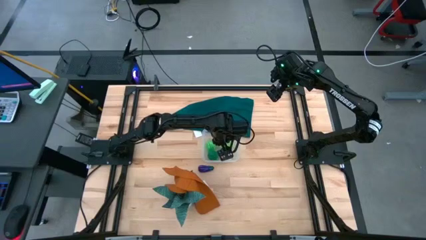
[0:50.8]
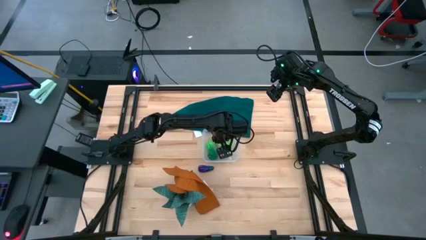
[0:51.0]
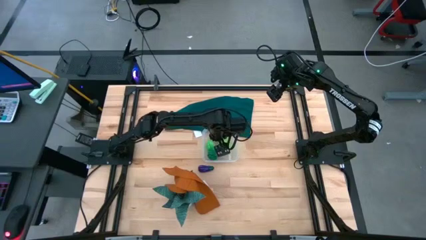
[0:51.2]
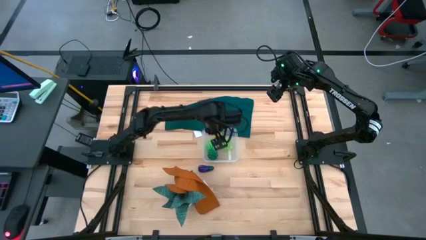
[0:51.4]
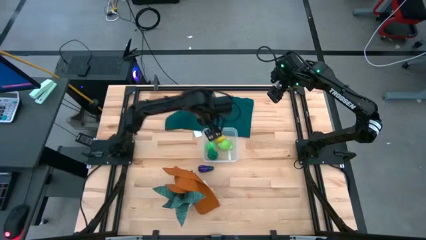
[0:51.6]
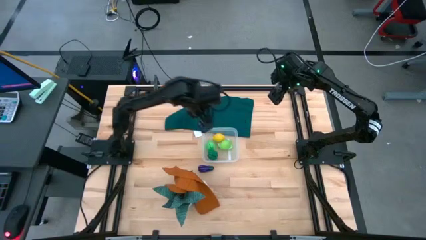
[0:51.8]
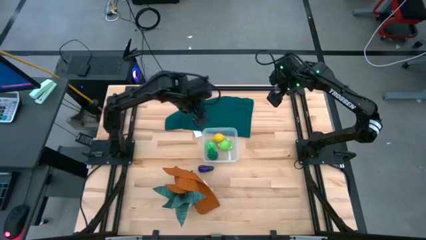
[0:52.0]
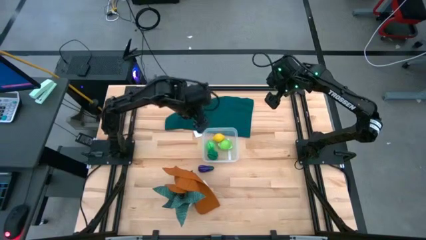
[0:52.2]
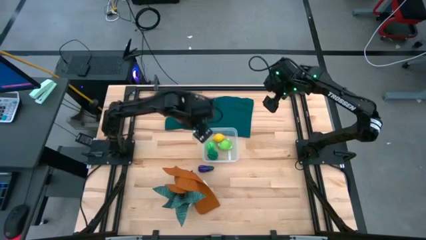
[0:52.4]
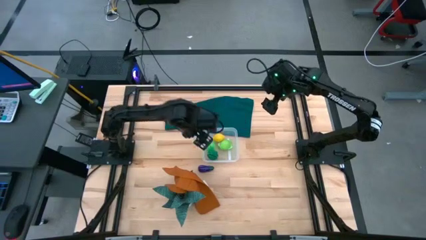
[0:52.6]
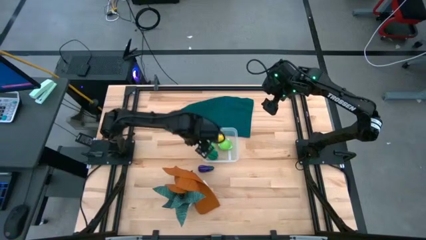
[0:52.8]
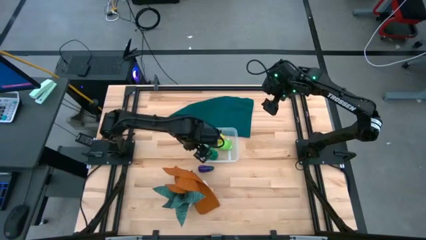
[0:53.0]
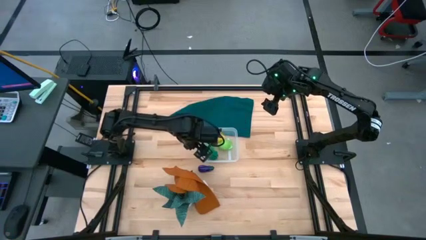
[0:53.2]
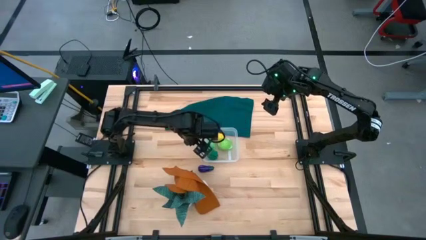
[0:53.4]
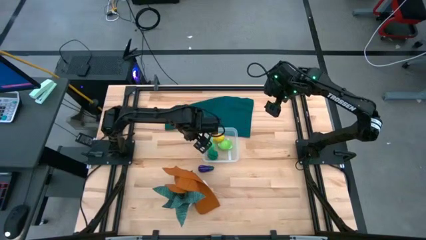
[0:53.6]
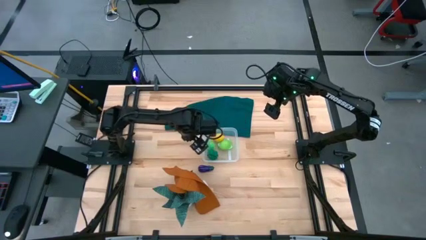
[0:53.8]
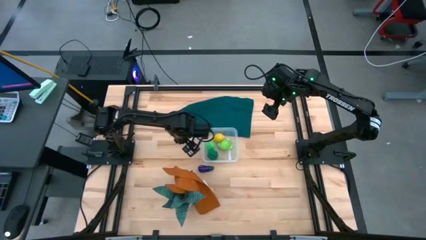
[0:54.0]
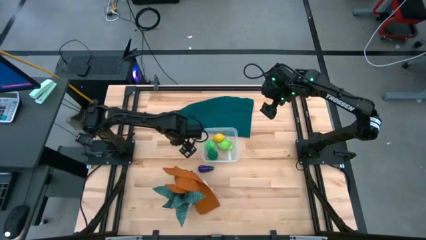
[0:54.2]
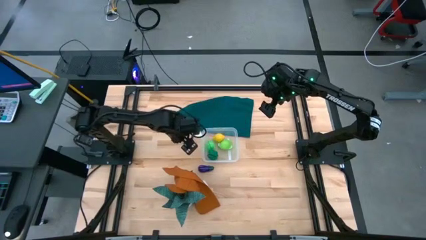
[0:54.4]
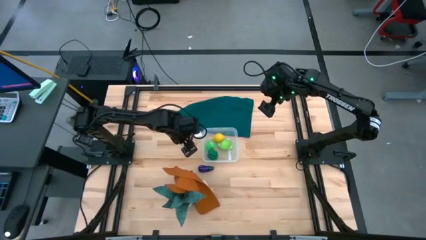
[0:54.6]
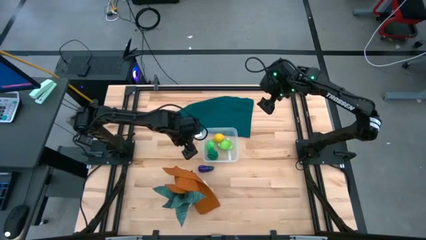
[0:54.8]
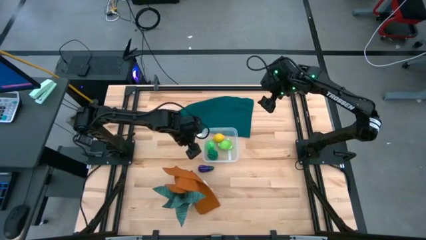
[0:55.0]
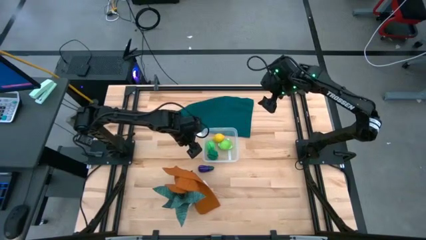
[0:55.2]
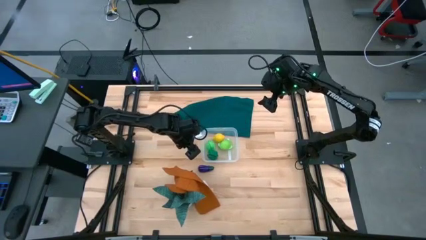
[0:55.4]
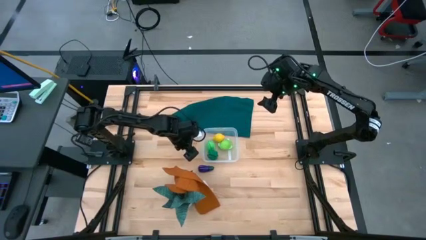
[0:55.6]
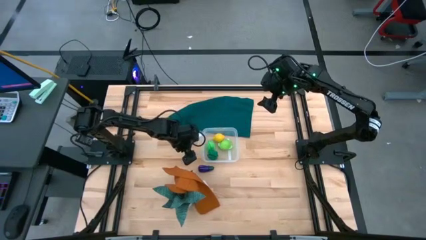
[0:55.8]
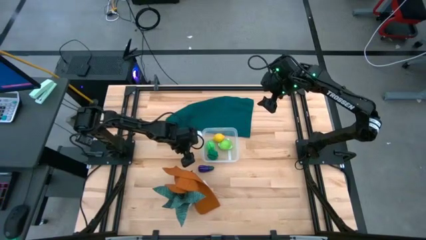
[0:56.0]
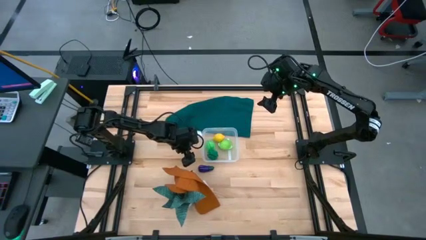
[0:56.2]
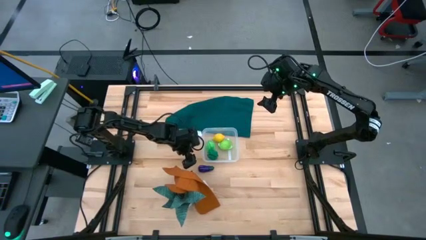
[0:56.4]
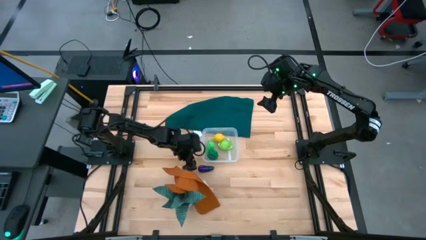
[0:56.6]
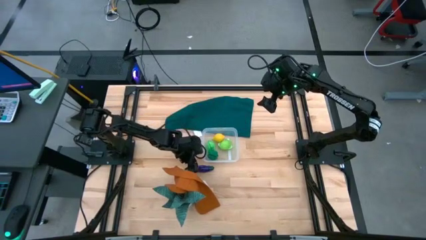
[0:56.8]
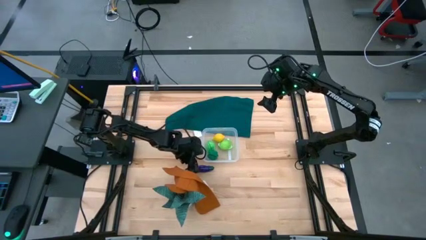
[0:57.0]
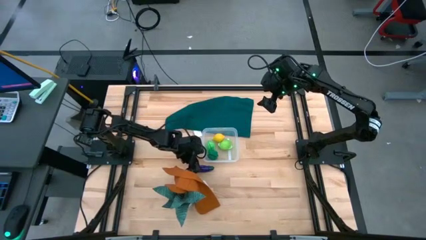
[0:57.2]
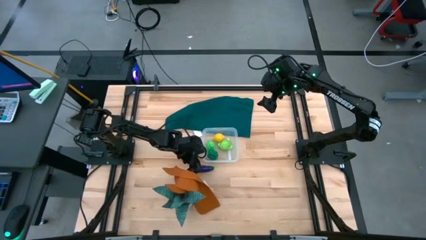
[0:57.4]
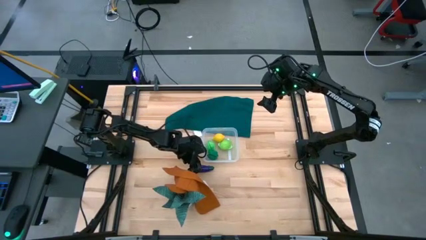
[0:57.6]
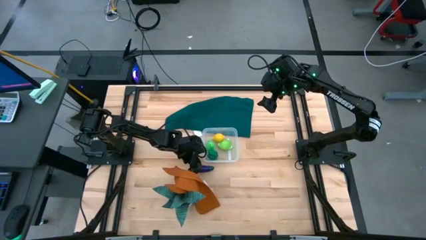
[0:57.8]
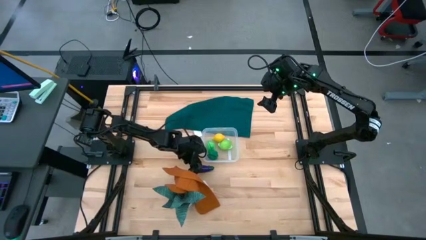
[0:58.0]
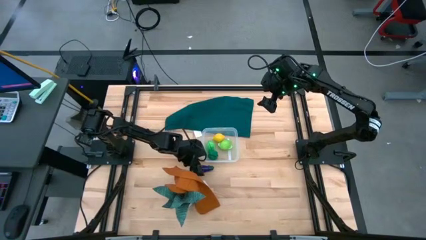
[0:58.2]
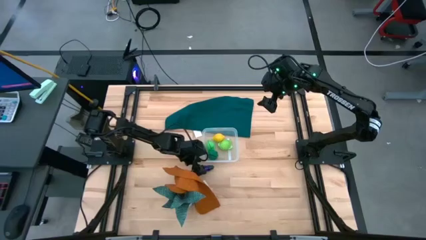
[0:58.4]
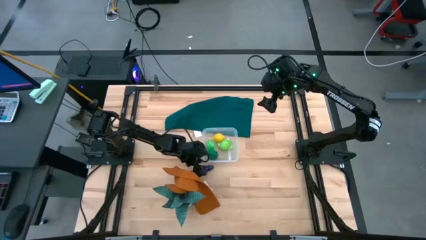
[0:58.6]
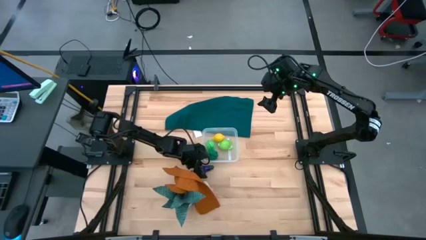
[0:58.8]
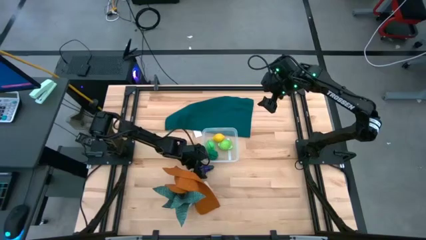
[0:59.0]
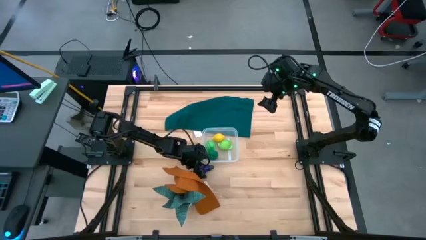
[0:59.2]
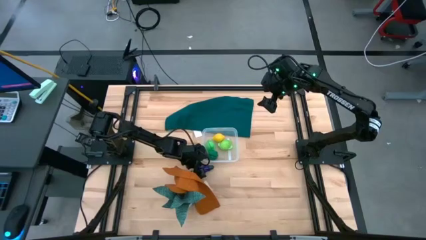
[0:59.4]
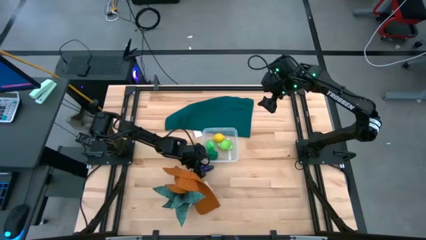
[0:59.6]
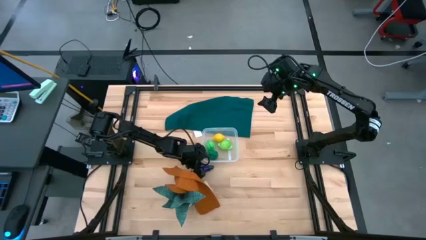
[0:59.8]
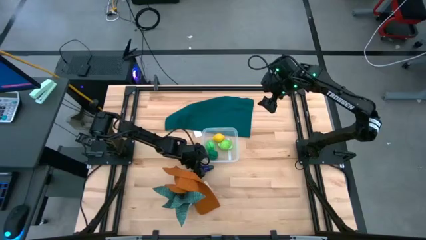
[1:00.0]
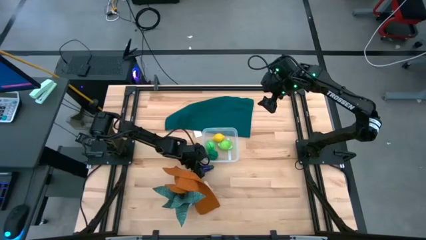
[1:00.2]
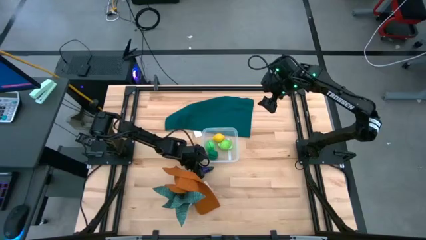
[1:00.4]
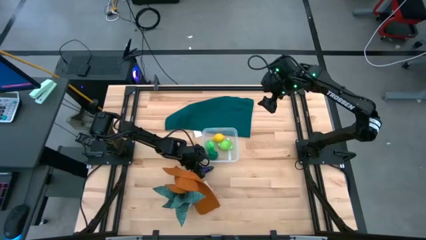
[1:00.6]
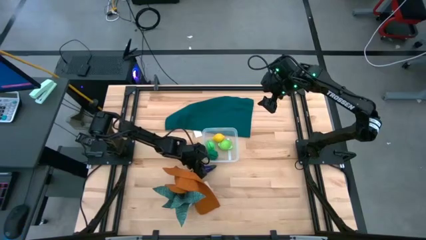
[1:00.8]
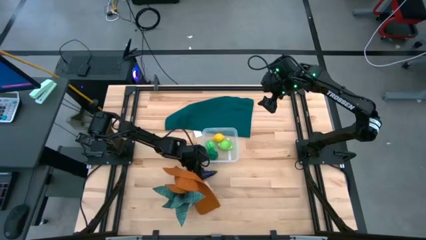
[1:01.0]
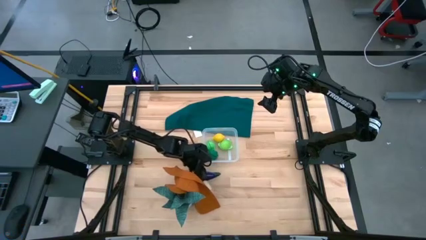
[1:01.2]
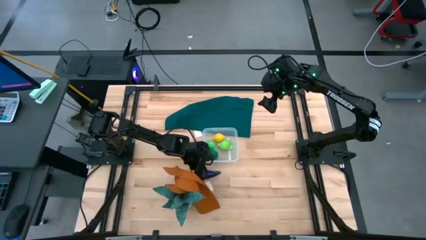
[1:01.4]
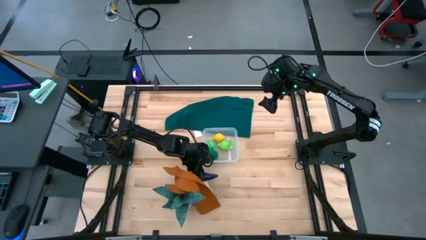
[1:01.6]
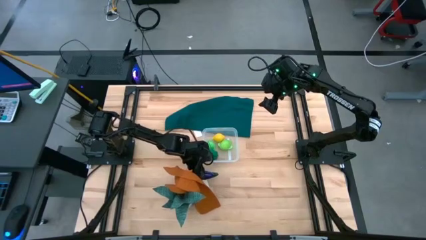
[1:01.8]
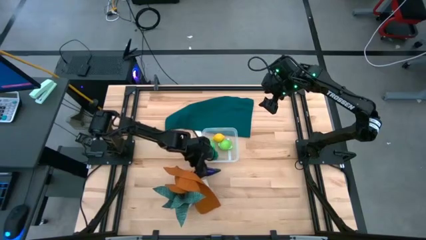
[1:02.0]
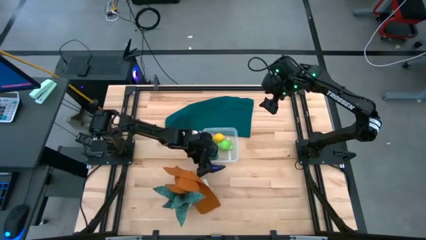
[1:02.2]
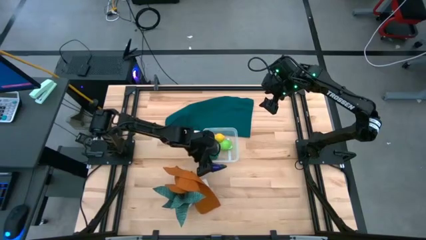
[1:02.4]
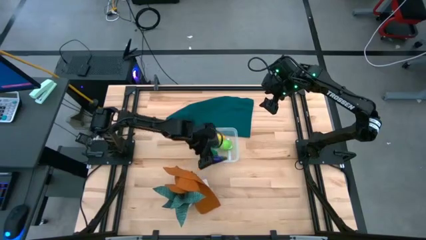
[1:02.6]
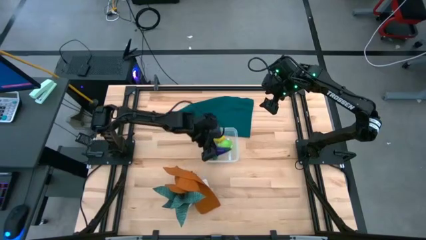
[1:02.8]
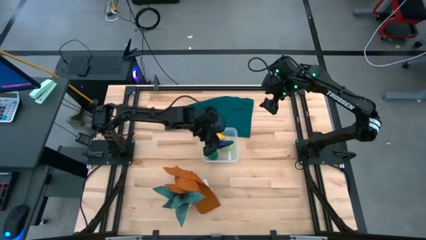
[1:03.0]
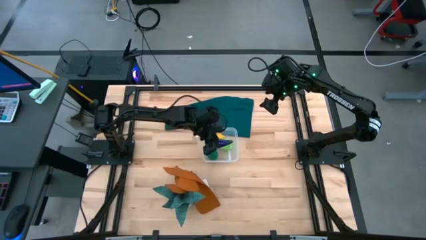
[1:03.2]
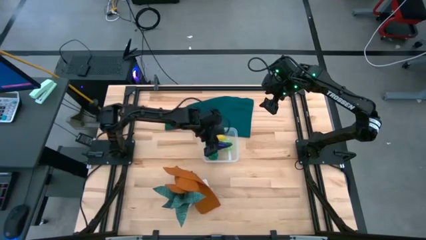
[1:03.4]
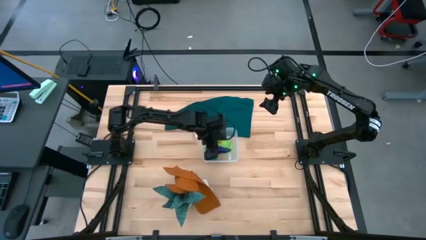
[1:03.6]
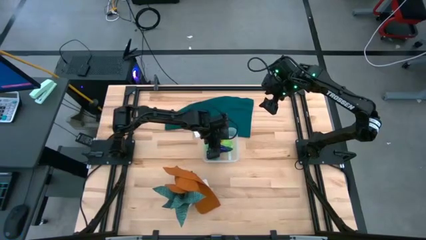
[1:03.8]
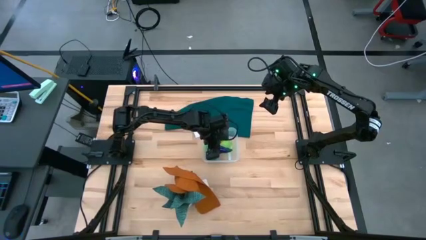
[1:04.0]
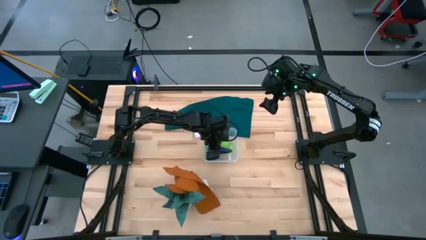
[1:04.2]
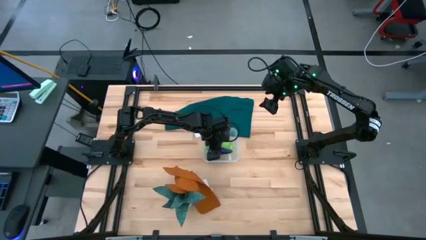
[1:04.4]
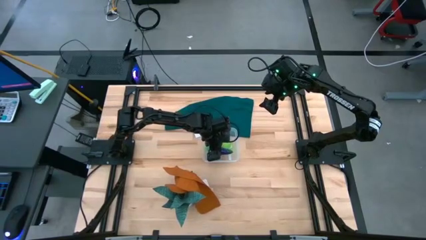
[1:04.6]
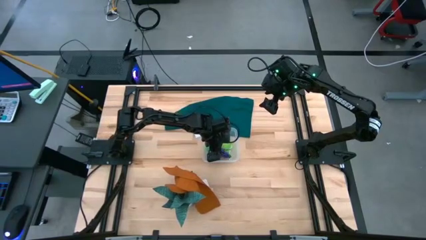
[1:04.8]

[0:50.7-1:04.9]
Task: Pick and placing Produce into tupperware
Put the eggplant into the bin
